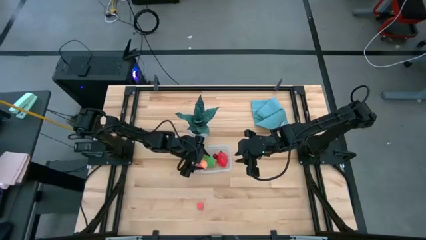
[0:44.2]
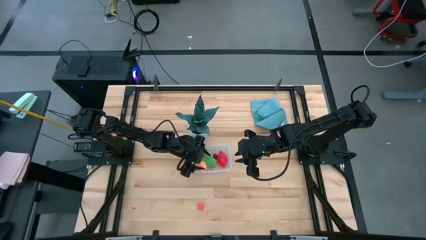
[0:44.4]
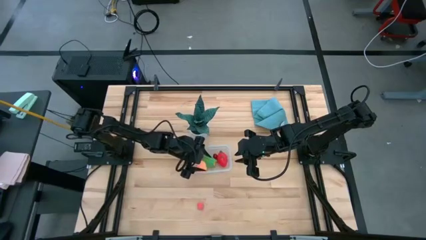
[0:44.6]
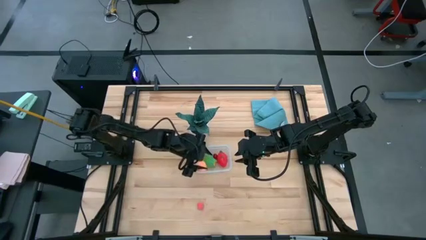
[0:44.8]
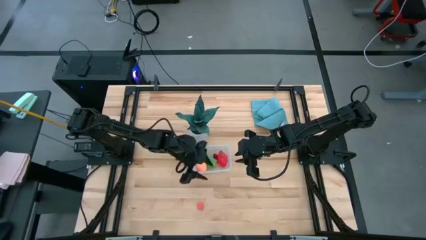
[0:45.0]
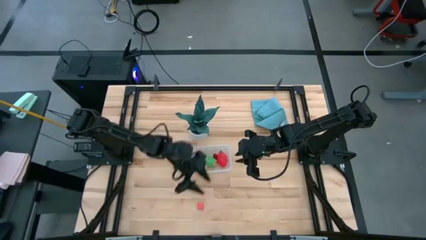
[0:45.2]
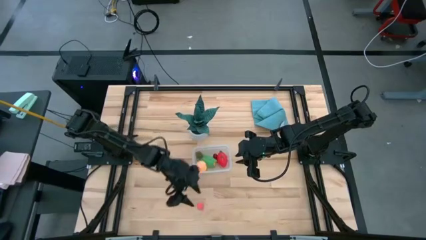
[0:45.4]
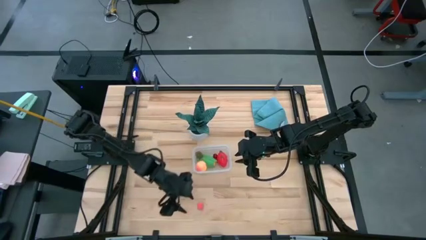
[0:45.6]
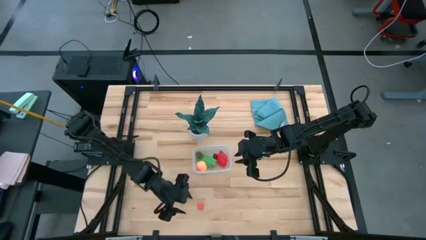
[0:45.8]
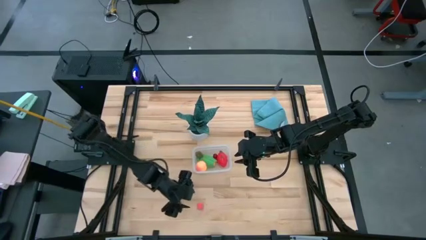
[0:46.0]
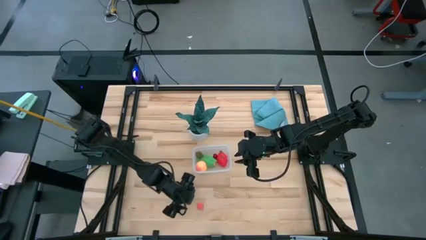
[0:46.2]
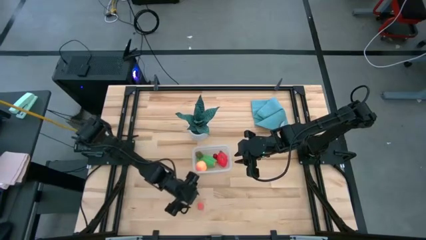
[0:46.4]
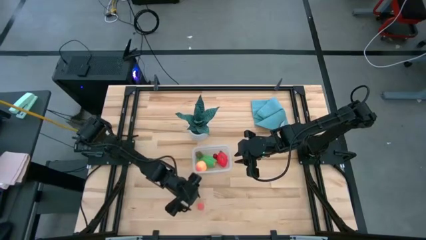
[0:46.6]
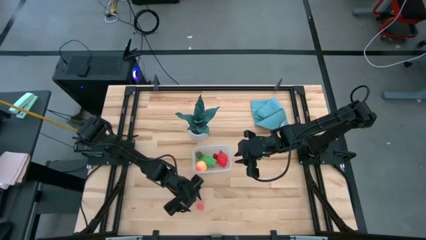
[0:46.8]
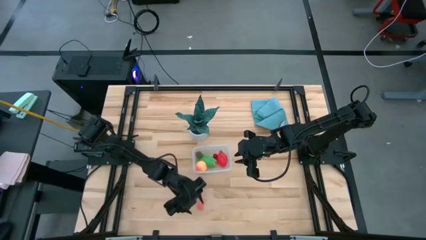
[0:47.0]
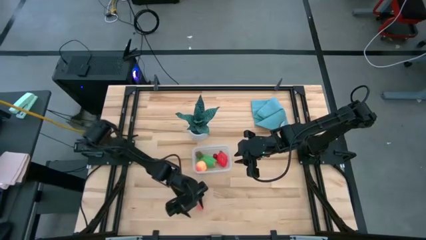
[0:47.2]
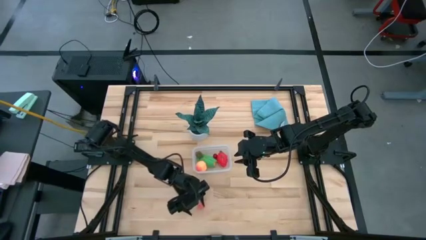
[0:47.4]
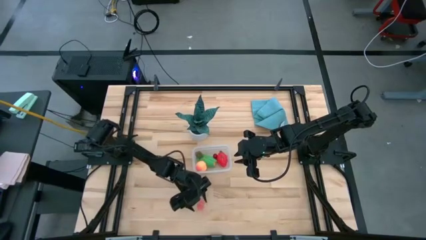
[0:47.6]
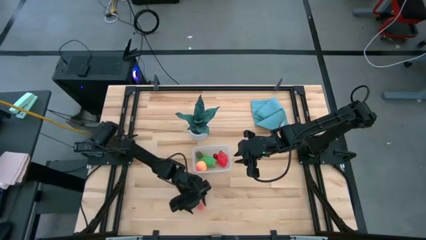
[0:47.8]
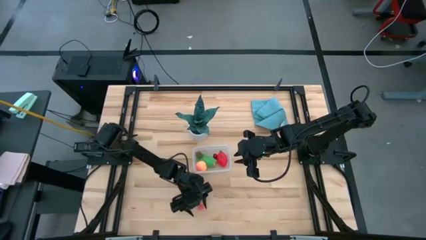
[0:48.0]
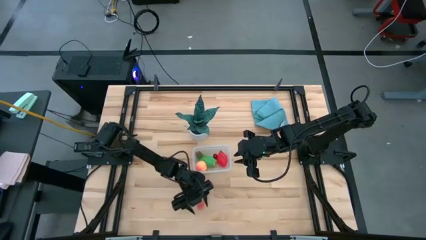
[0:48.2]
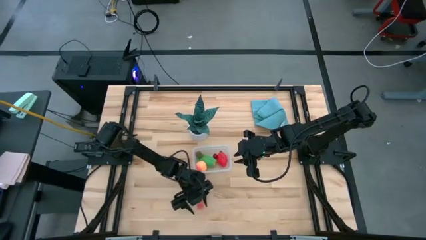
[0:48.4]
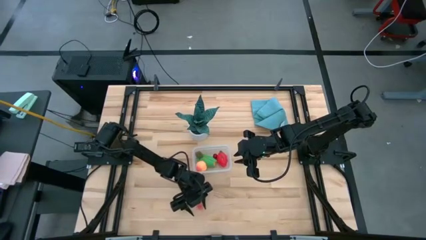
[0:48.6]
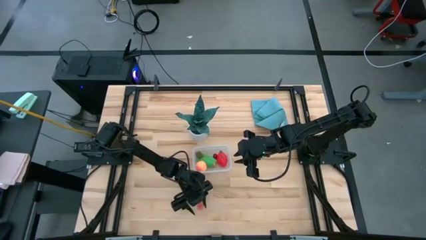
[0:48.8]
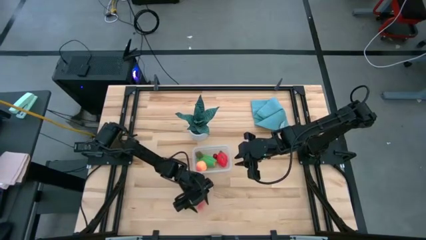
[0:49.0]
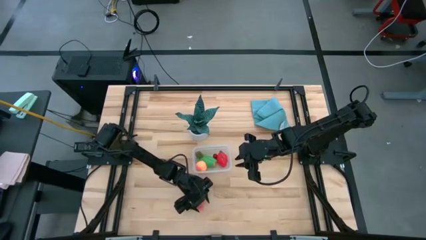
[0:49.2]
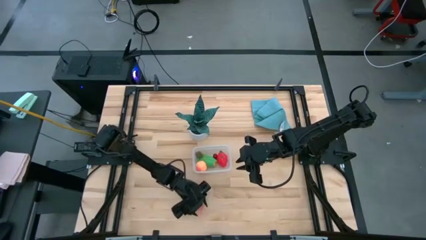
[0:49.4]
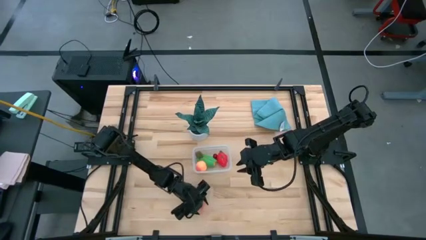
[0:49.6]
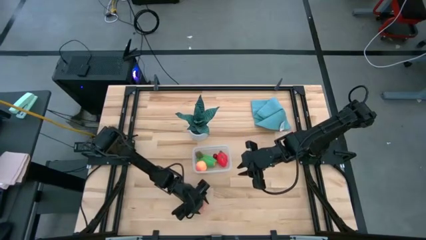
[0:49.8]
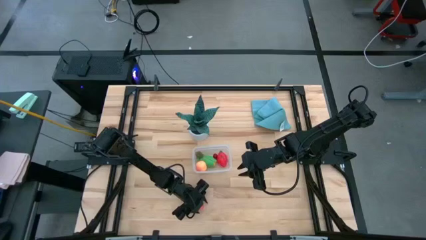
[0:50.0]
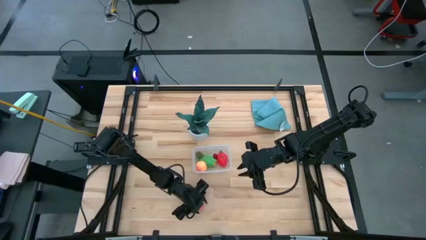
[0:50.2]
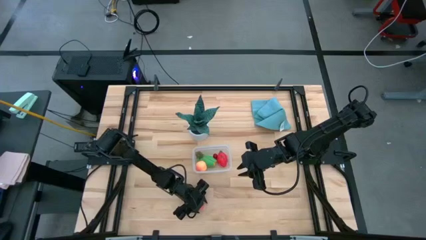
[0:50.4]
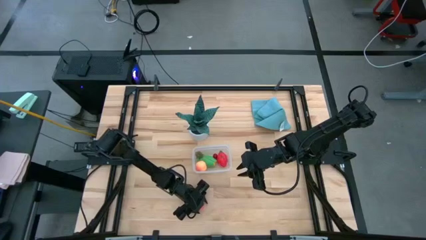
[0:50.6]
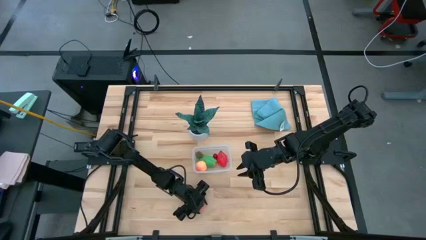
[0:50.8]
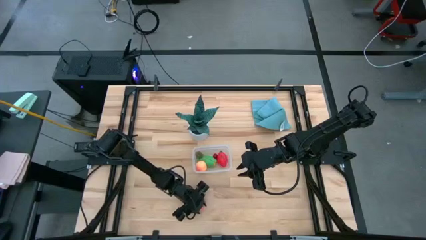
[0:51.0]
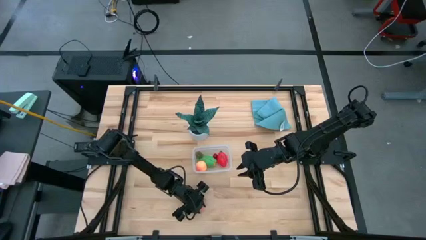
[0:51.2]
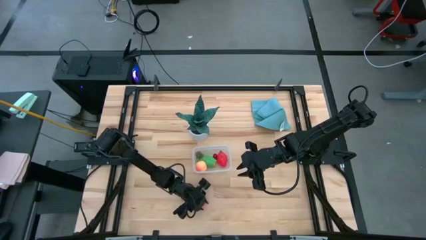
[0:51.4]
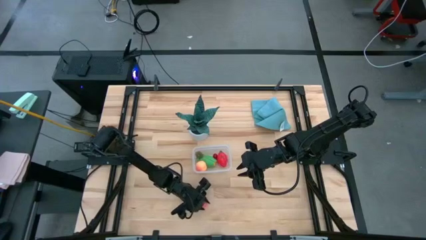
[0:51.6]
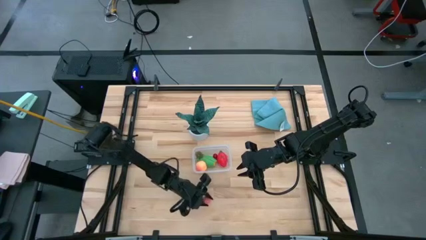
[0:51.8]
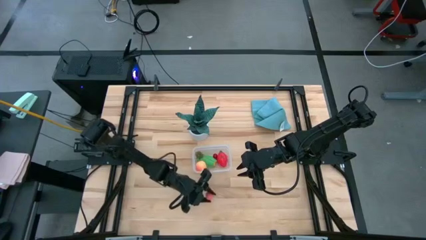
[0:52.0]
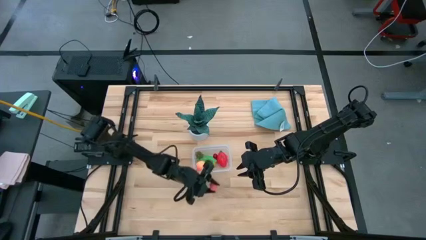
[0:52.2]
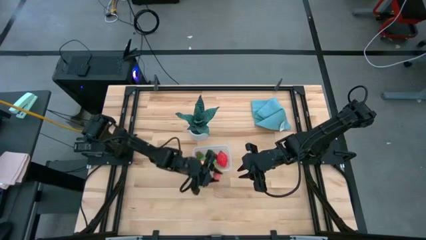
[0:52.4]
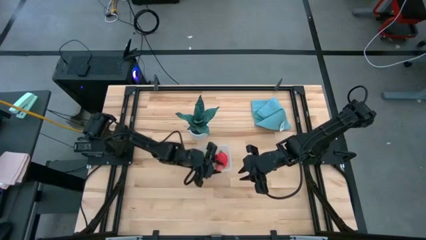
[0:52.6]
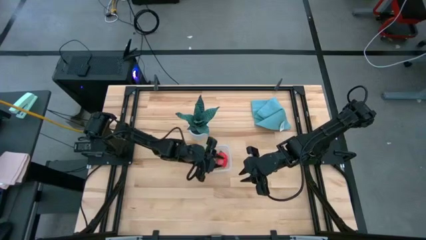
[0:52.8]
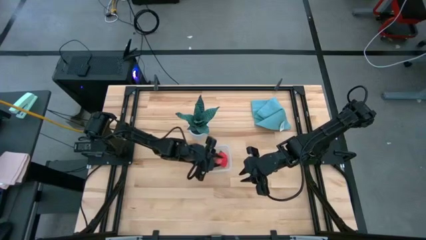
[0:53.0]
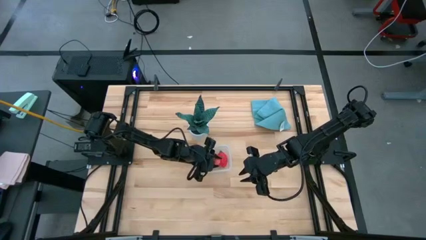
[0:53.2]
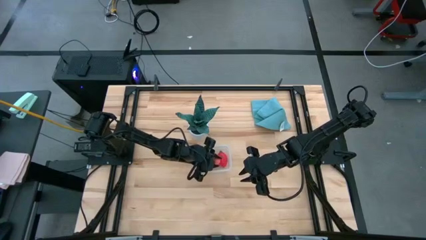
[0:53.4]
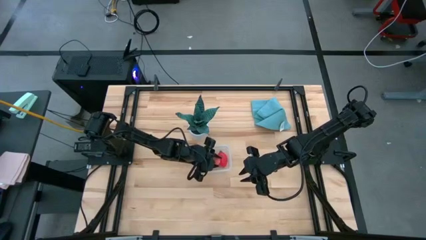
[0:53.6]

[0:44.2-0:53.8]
Task: Pick and placing Produce into tupperware
Put the pink peach into the transparent container

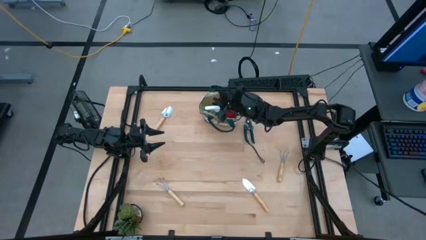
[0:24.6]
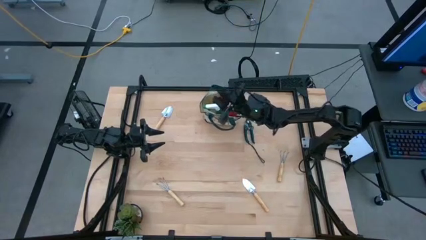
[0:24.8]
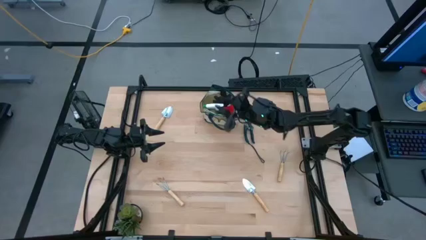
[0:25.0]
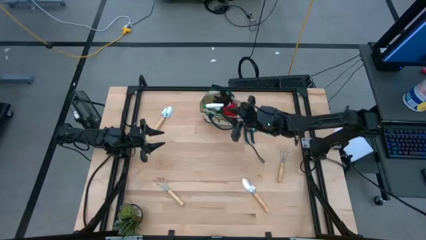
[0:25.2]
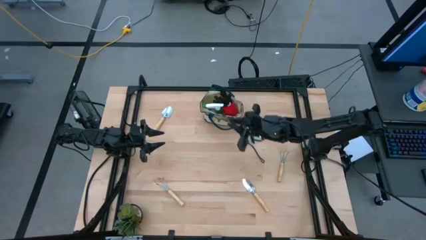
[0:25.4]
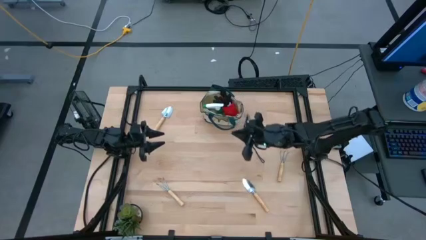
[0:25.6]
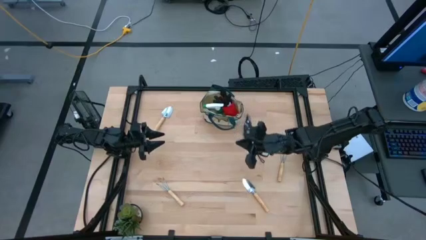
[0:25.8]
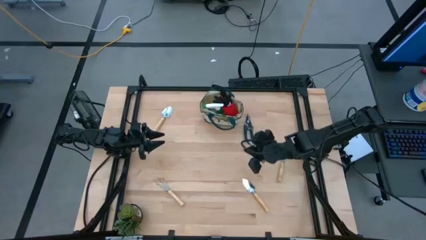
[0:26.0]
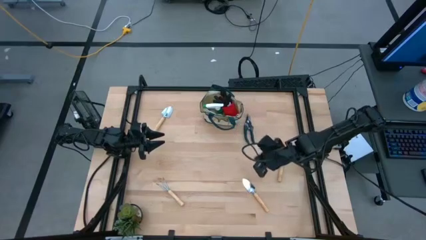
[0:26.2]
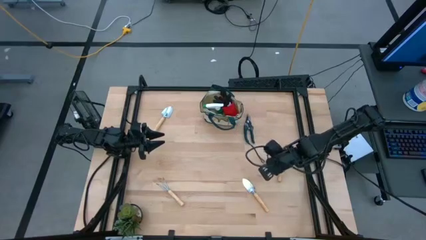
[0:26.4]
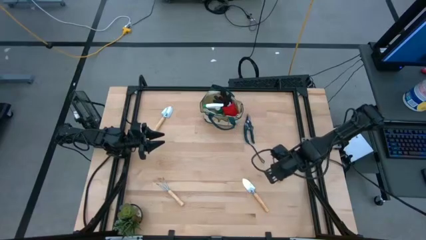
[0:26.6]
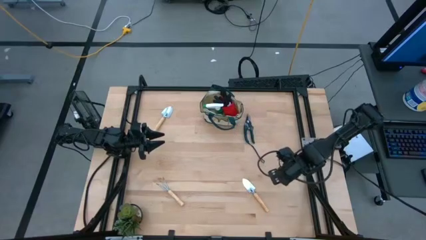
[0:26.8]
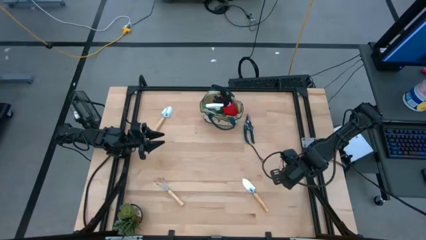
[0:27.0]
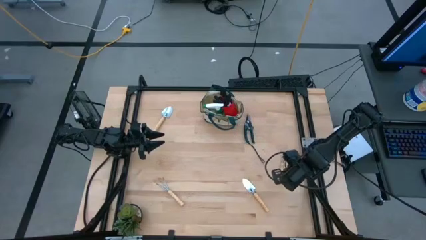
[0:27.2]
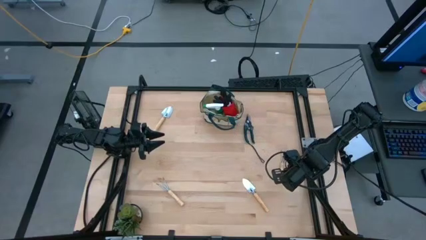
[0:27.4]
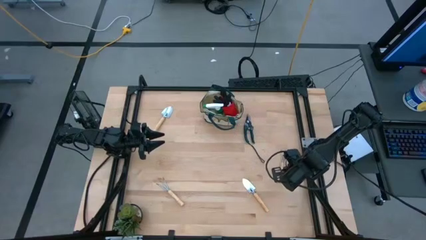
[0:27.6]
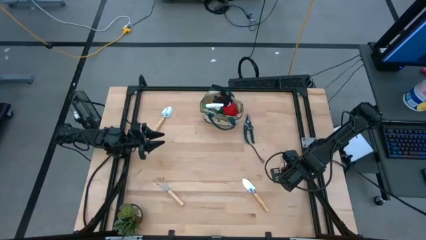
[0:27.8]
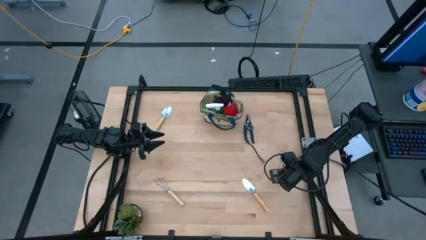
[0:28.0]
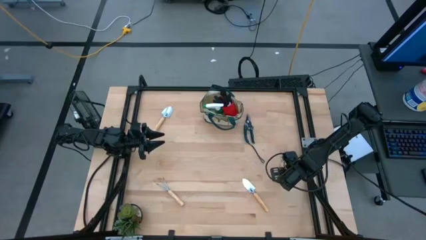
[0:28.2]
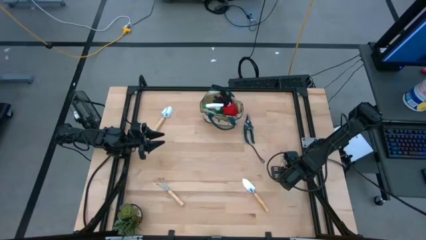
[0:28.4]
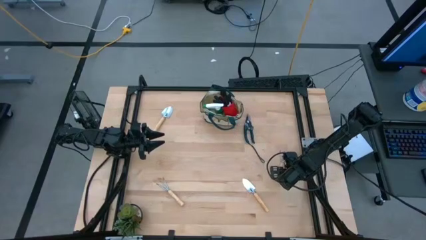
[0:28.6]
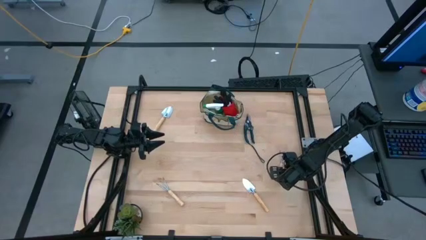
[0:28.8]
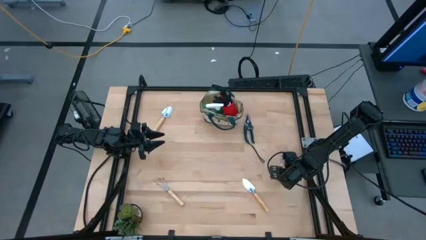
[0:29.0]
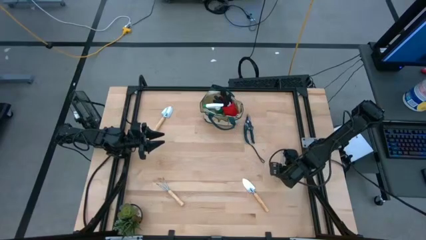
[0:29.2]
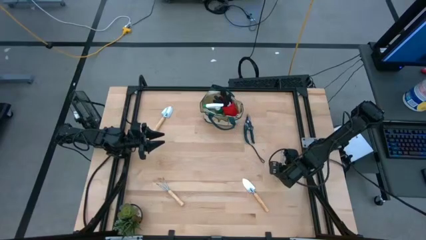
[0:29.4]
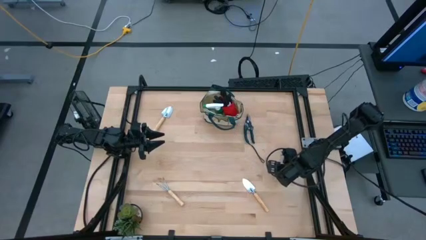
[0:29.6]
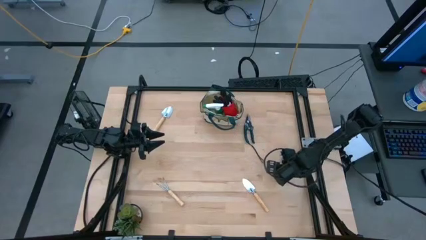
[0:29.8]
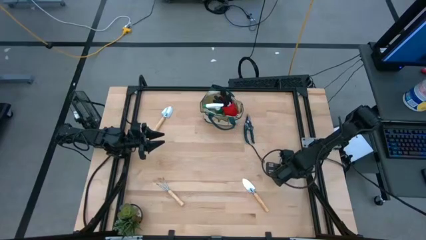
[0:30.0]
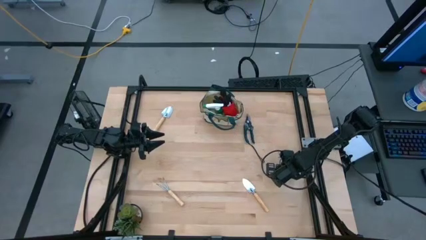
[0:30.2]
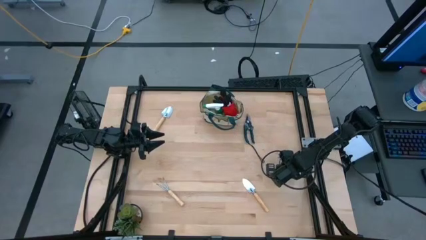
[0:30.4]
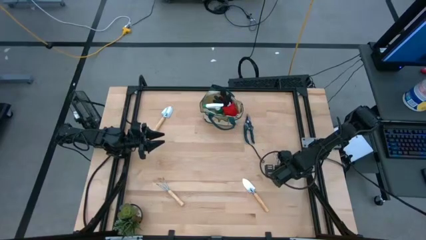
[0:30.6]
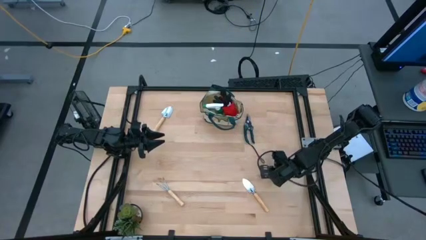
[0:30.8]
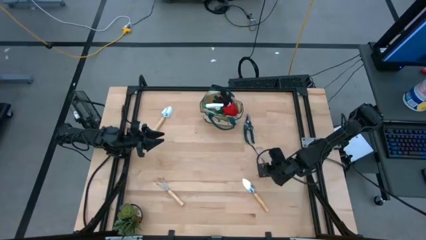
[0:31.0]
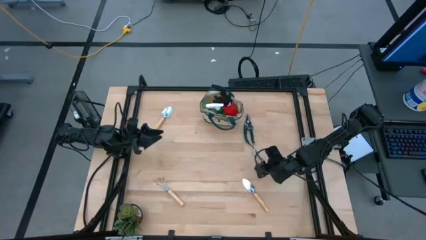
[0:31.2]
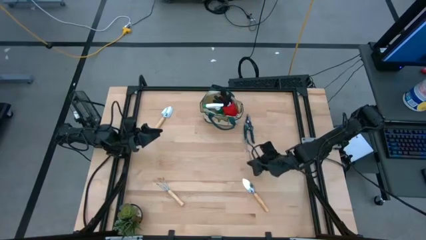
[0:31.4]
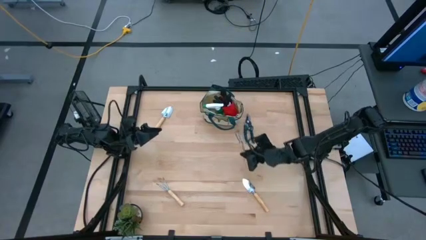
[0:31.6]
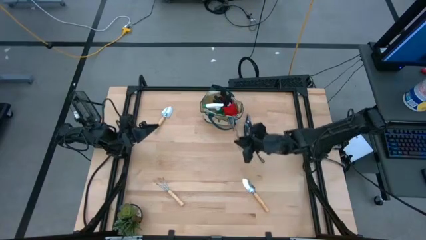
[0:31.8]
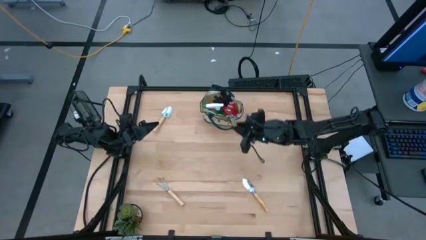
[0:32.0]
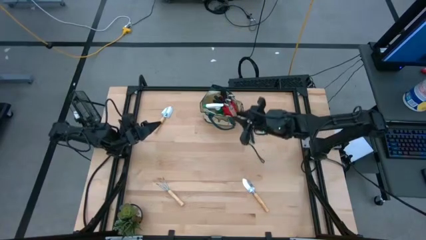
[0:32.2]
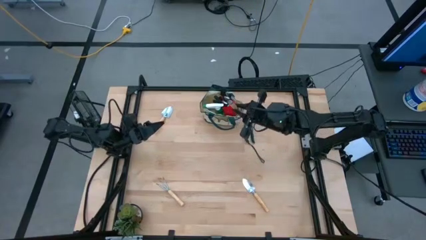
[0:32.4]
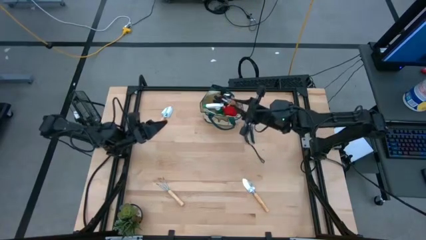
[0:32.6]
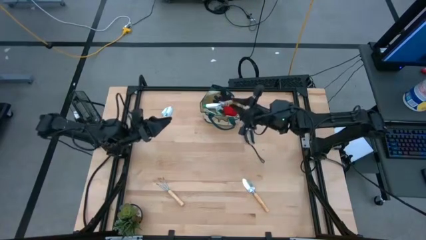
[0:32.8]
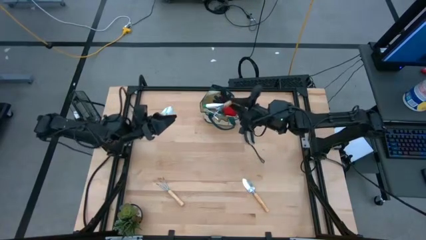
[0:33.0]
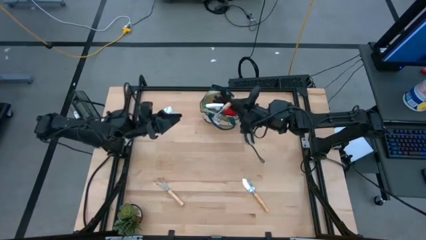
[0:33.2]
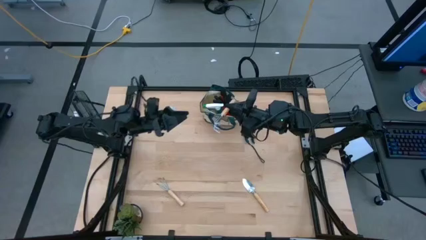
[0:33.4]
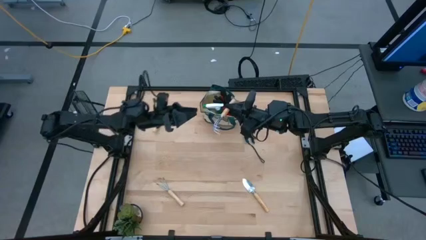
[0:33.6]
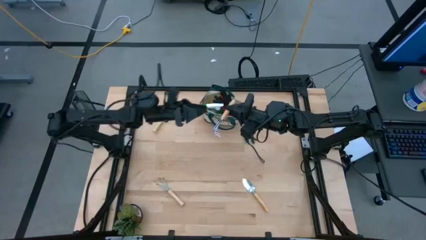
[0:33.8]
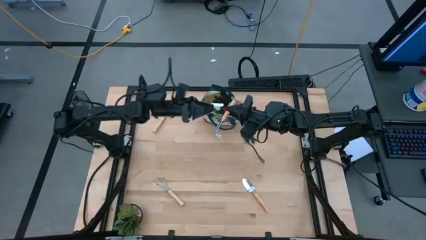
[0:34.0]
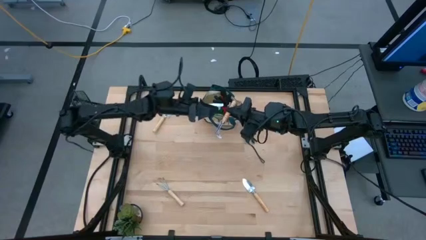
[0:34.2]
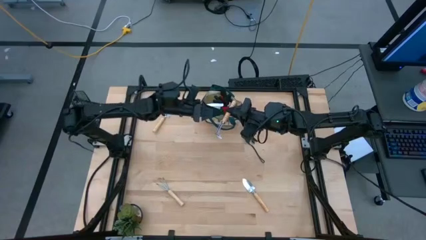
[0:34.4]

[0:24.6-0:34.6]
Task: Pick & Place Garden tools in Gardening bag
Put the right brown hand rake into the green gardening bag
